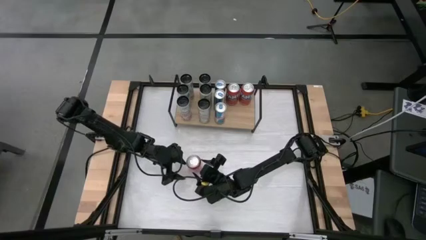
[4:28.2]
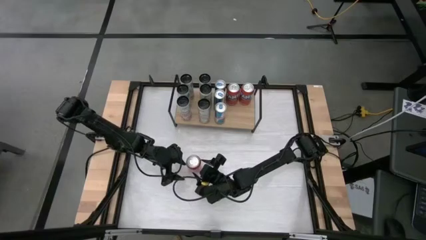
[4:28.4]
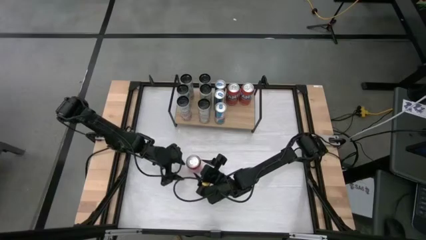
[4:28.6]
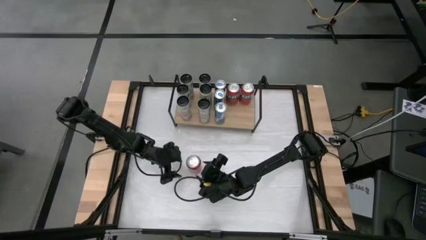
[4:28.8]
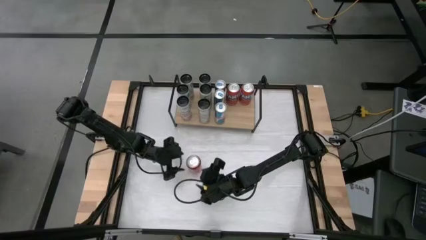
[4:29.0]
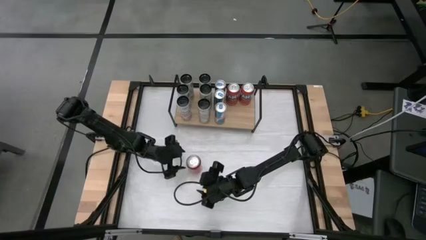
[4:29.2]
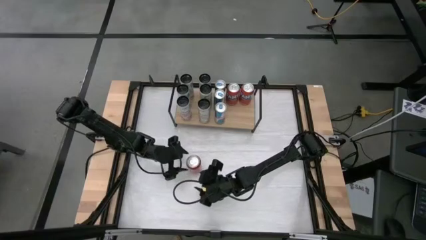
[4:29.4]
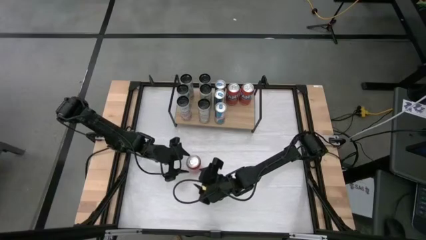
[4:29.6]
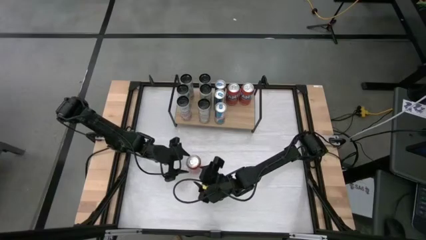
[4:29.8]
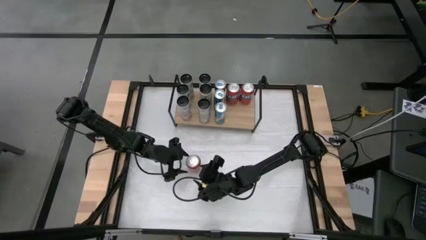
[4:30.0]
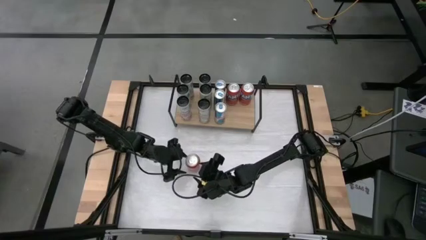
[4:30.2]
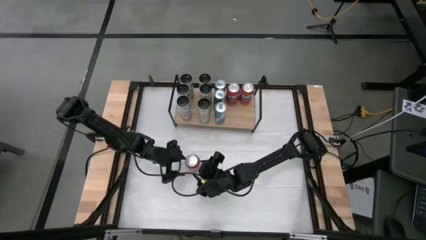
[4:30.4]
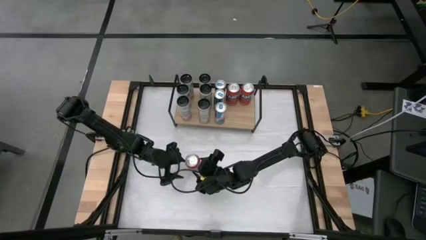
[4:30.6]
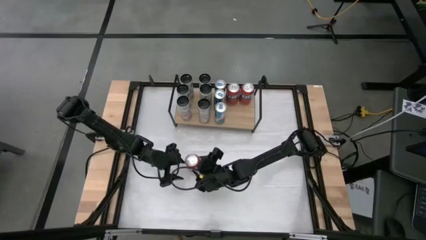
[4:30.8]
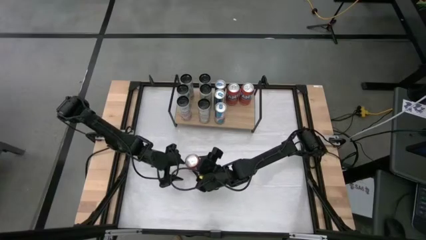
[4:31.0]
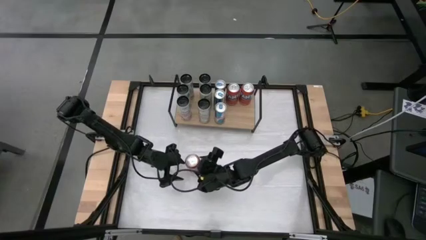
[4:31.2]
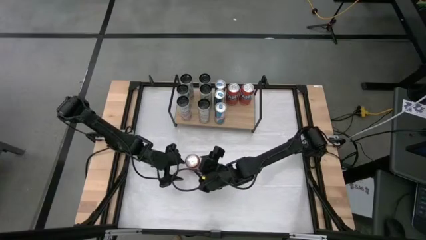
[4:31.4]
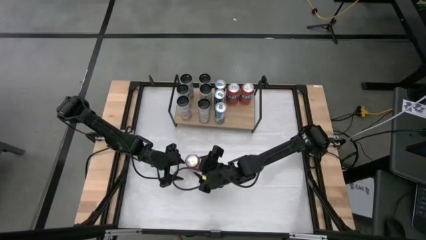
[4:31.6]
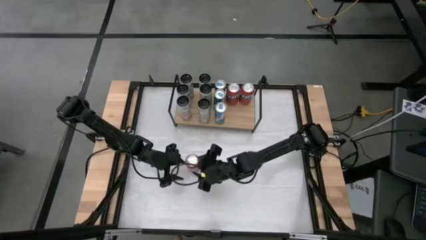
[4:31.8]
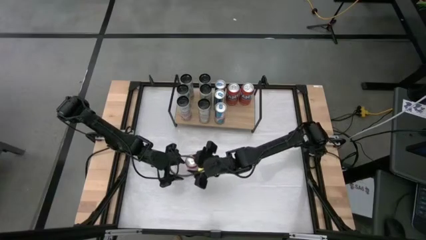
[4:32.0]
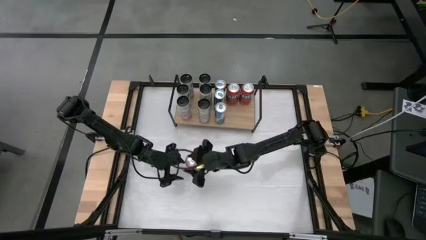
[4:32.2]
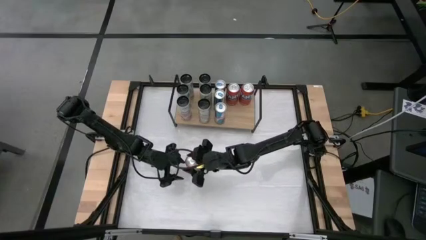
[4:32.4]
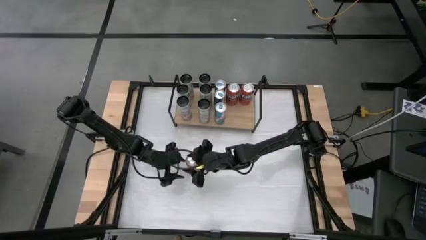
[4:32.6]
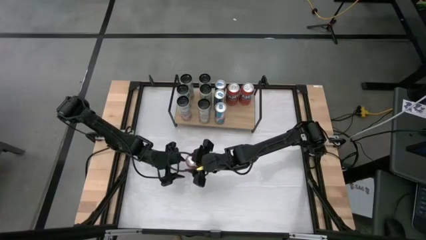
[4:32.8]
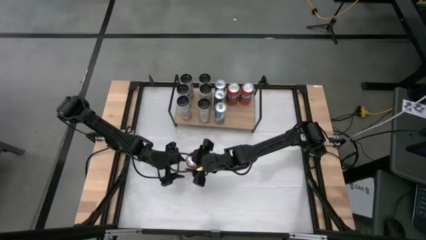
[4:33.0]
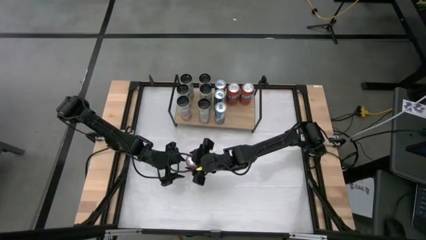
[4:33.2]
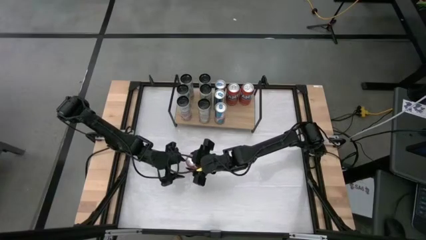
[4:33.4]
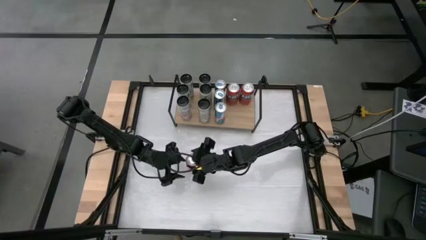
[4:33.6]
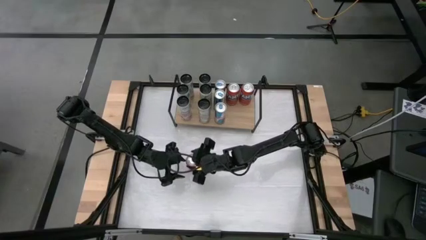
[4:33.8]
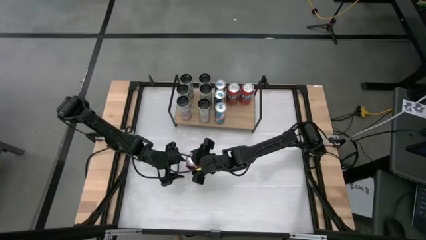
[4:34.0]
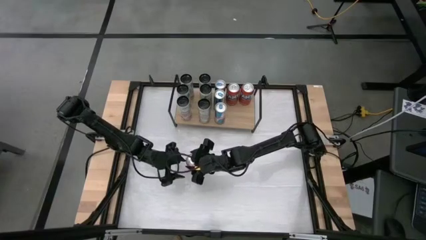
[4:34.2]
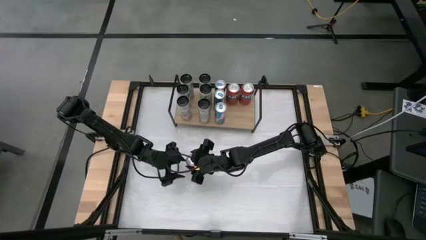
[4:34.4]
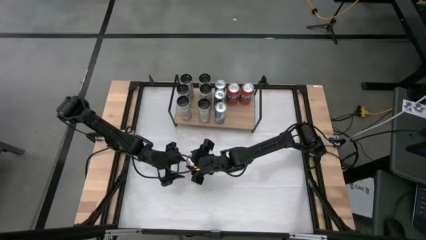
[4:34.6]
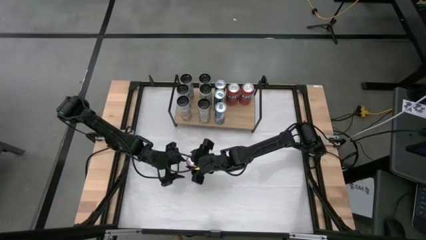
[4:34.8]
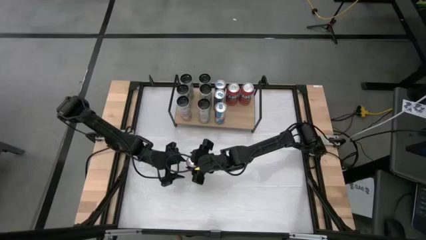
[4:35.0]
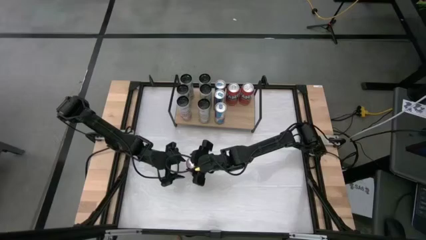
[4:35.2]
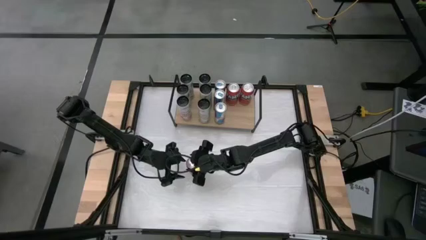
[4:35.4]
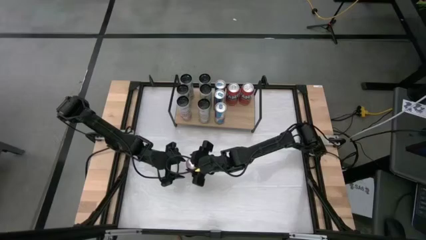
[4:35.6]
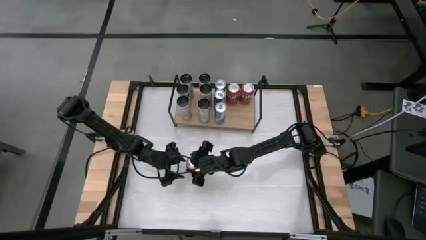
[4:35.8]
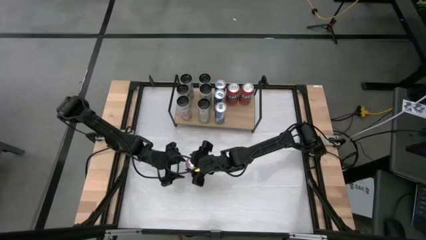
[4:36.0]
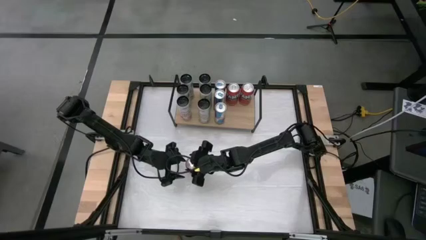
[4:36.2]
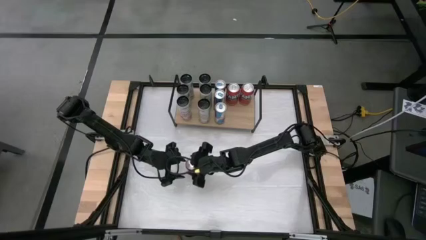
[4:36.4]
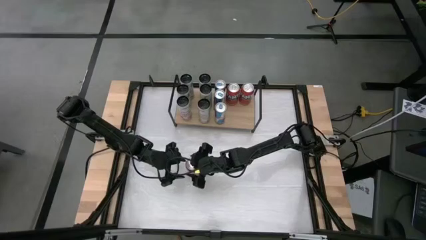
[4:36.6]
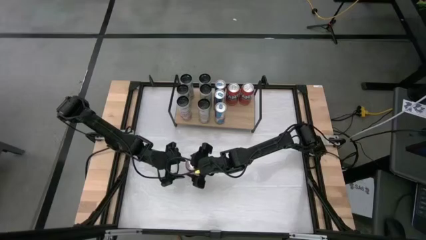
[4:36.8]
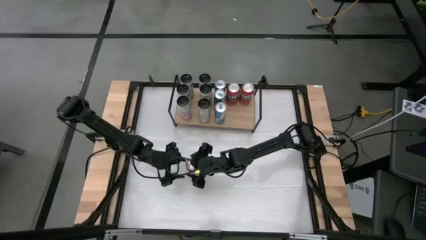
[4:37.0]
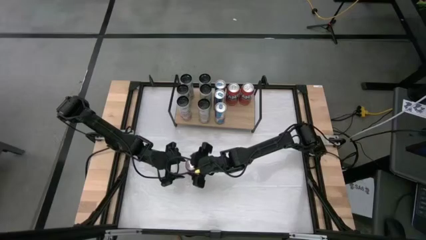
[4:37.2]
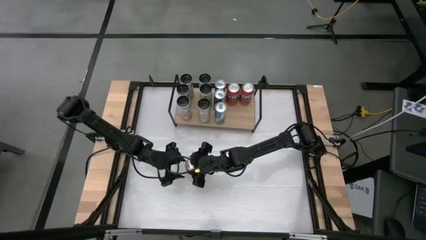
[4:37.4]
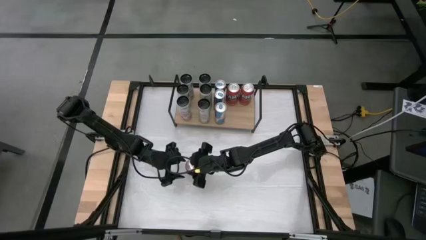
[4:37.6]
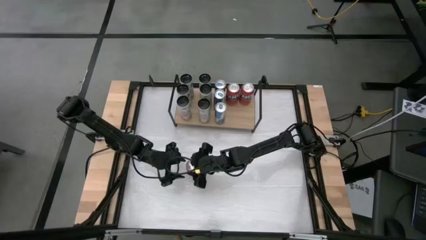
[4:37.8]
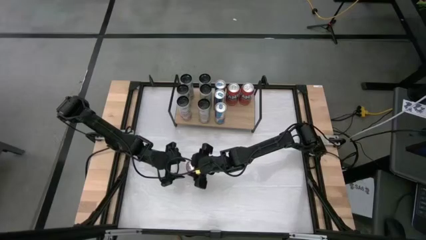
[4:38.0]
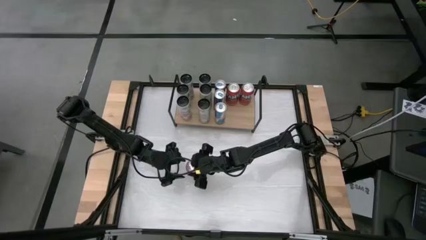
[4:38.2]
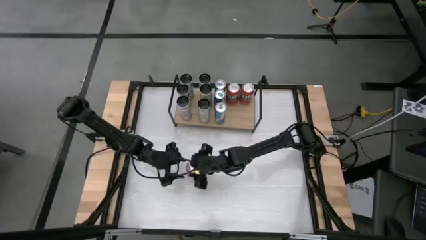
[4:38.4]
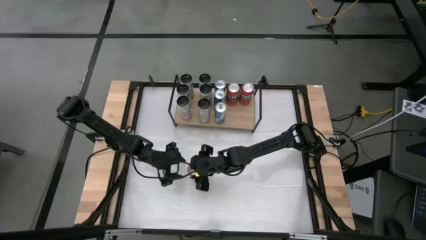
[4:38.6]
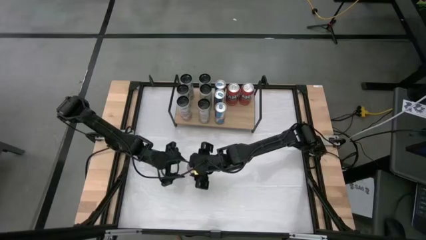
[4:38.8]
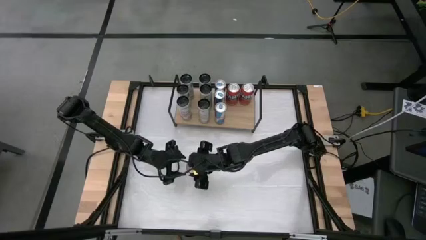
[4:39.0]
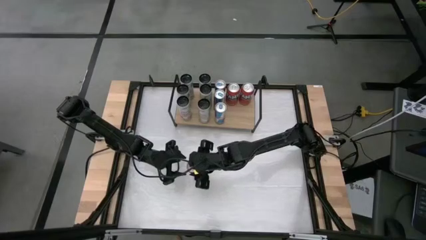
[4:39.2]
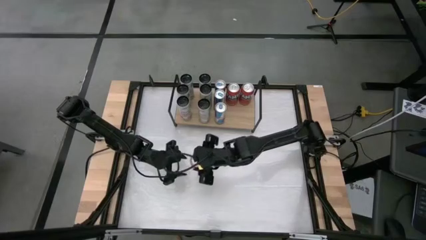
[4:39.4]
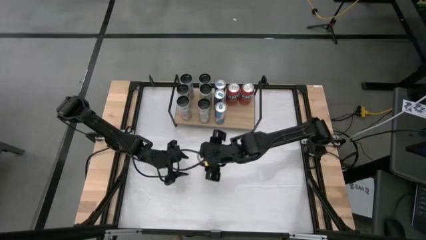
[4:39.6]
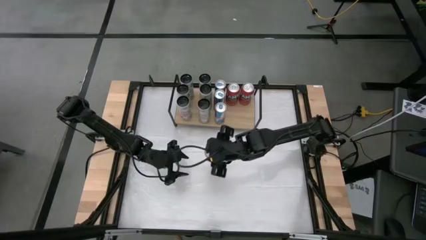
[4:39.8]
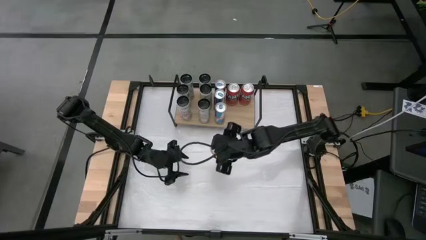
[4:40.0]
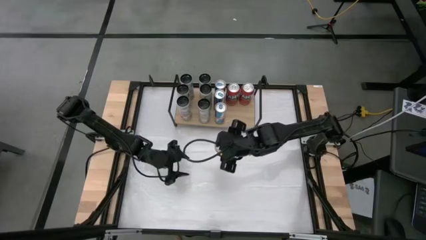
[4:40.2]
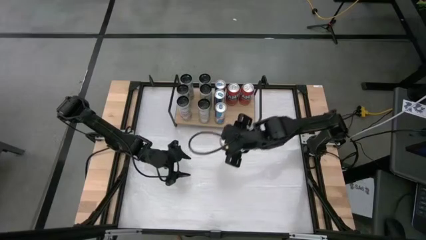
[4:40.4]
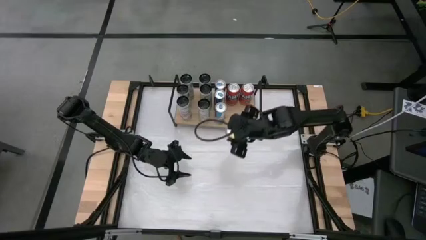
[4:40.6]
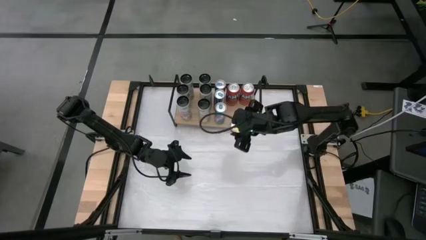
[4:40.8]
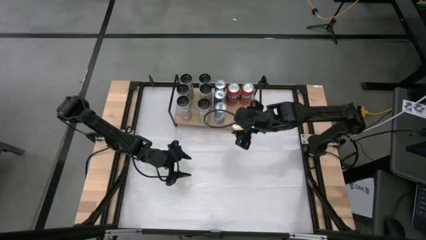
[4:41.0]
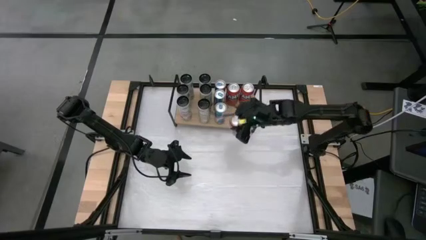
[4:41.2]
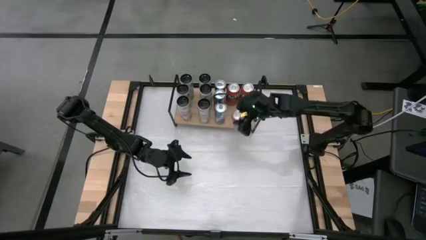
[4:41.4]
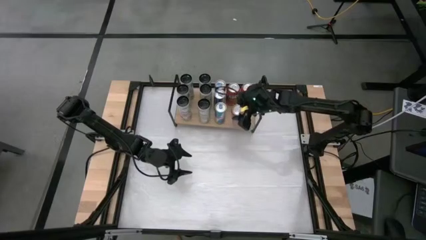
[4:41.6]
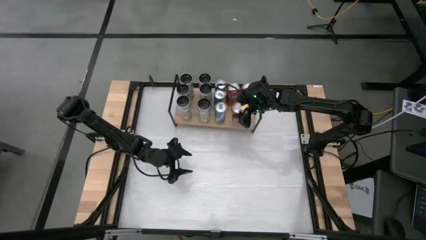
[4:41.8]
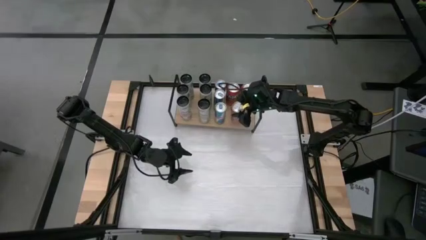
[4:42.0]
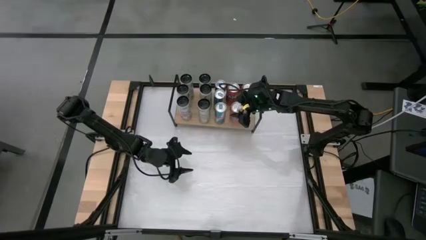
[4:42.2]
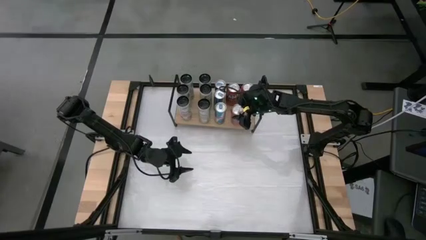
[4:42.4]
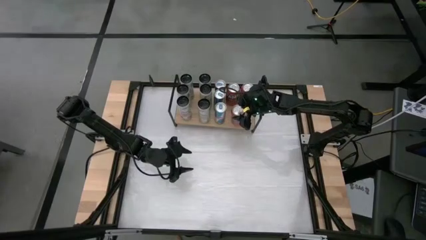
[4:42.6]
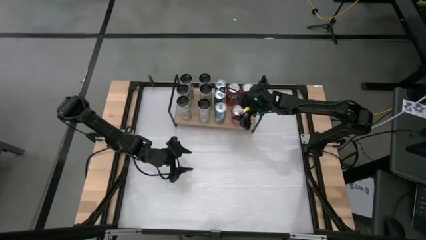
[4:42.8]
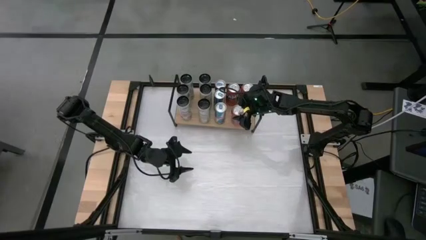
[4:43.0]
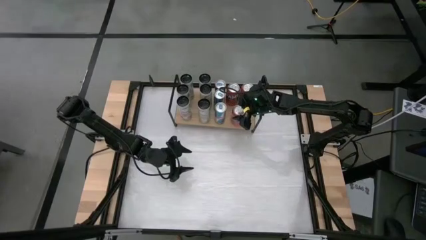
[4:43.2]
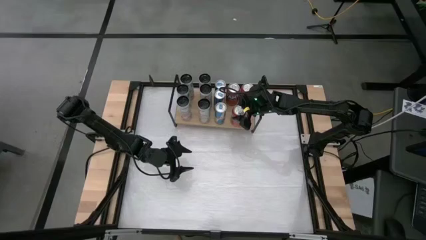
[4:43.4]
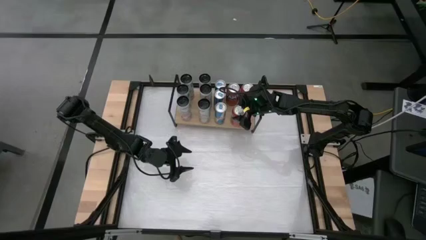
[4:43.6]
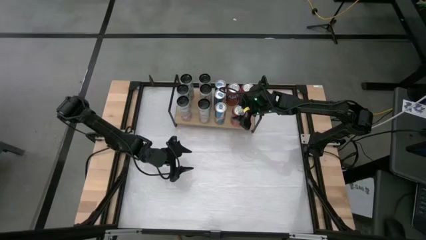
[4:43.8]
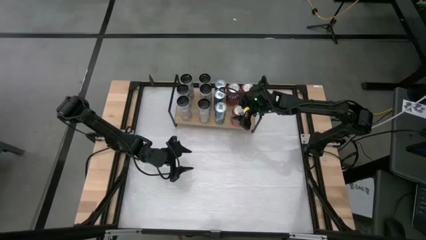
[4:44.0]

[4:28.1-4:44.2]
Task: Place canned beverage on shelf
Put the red soda can on the shelf
